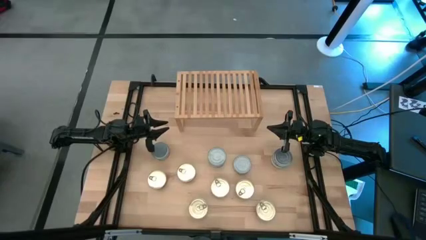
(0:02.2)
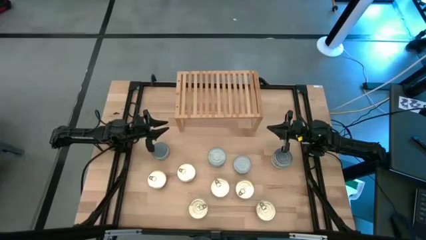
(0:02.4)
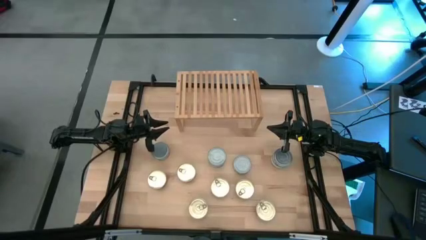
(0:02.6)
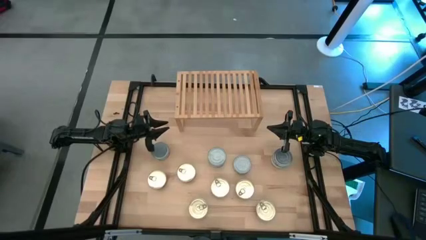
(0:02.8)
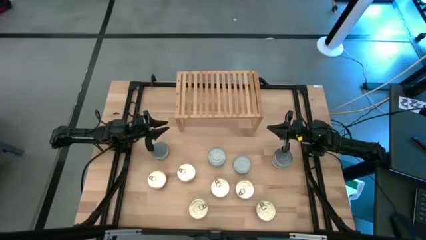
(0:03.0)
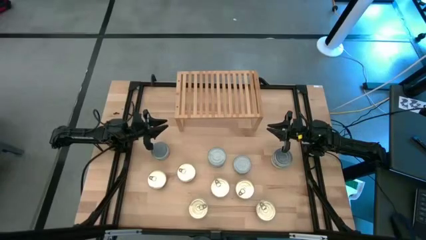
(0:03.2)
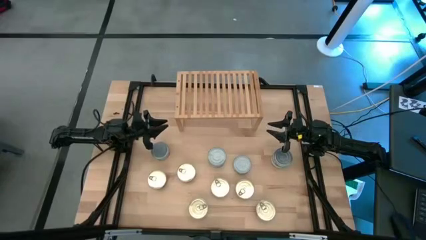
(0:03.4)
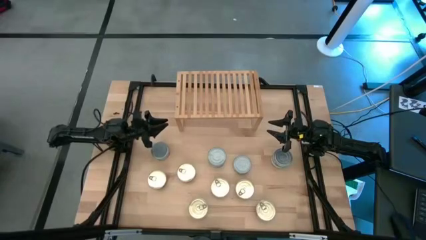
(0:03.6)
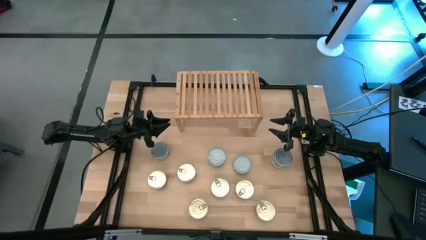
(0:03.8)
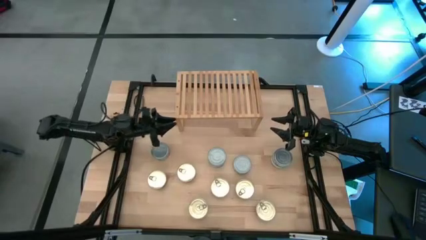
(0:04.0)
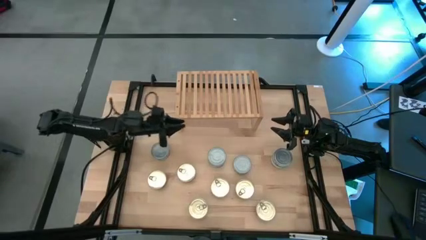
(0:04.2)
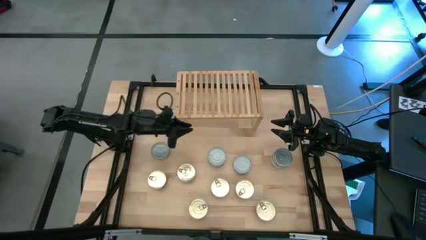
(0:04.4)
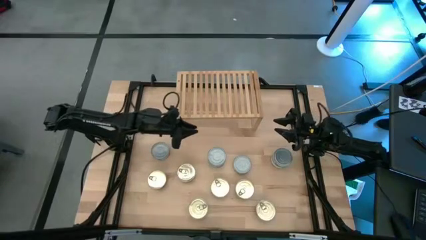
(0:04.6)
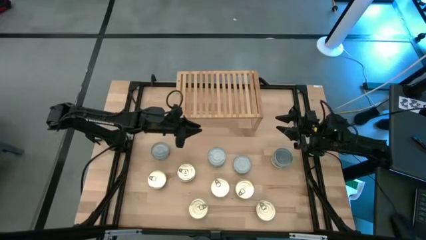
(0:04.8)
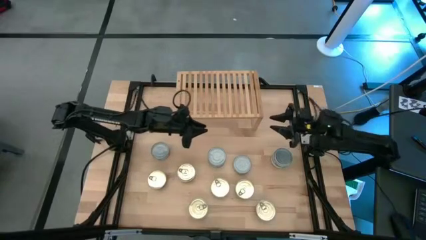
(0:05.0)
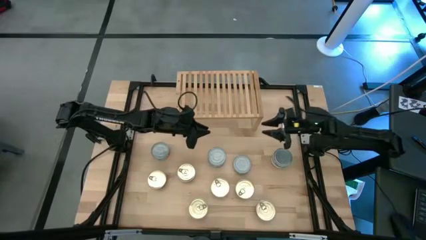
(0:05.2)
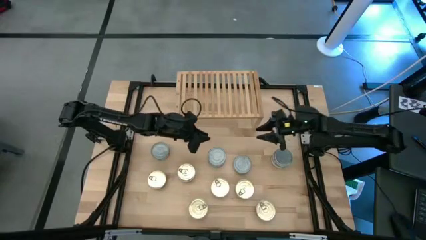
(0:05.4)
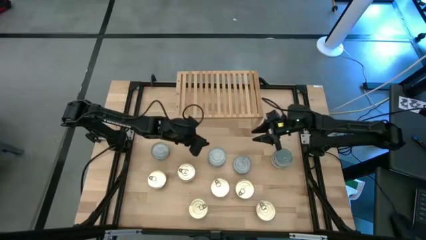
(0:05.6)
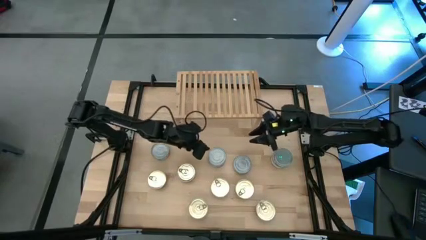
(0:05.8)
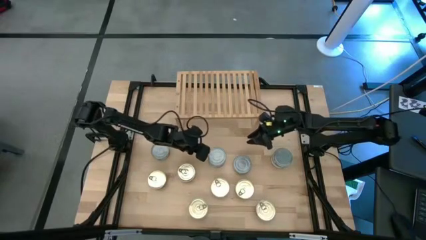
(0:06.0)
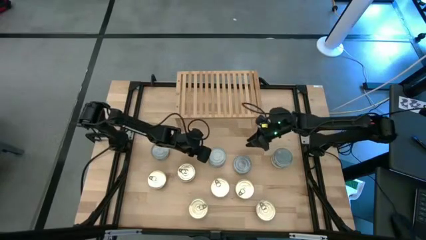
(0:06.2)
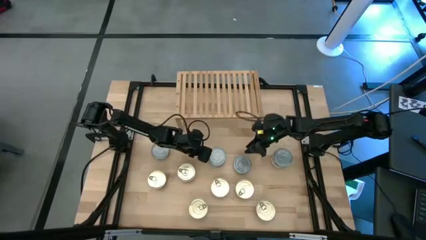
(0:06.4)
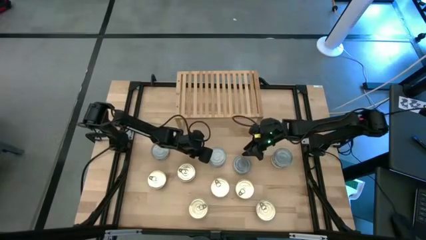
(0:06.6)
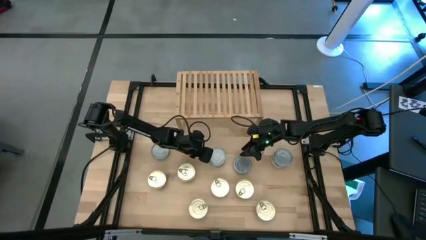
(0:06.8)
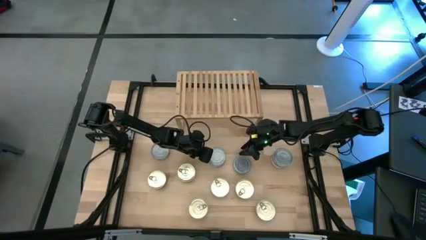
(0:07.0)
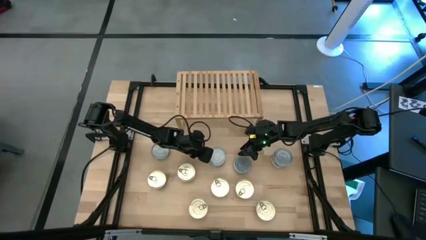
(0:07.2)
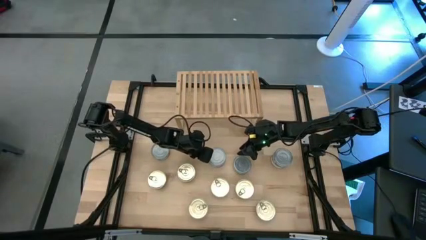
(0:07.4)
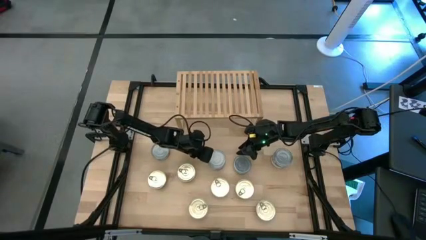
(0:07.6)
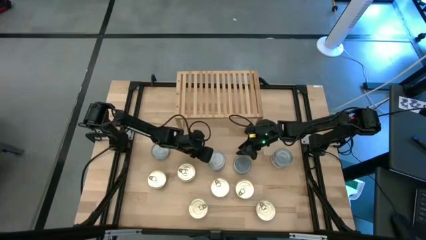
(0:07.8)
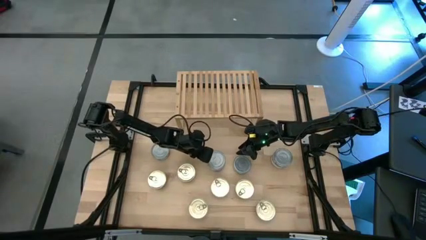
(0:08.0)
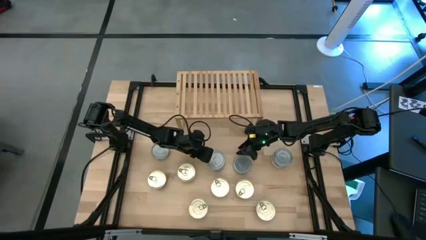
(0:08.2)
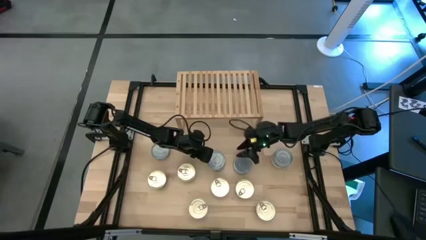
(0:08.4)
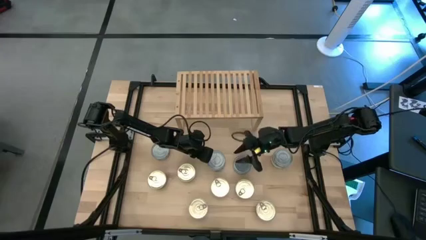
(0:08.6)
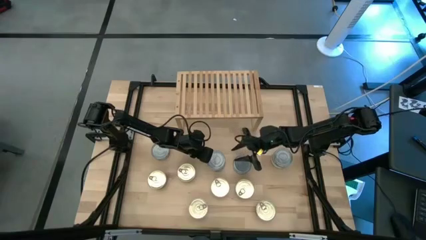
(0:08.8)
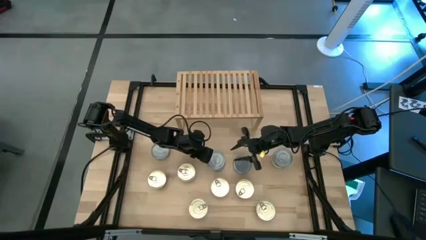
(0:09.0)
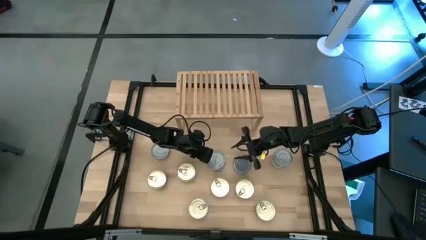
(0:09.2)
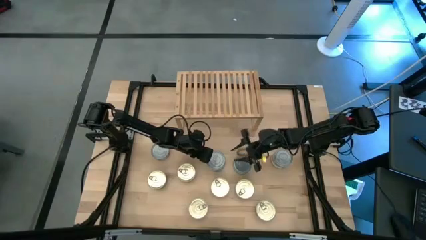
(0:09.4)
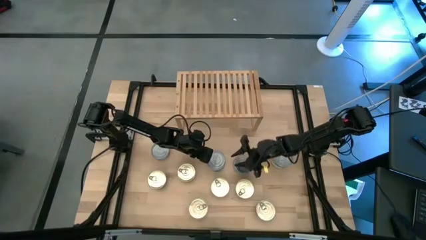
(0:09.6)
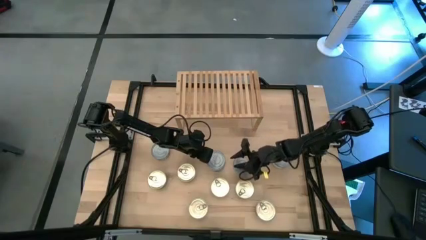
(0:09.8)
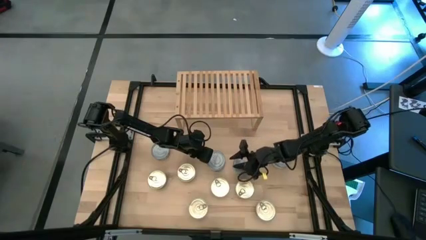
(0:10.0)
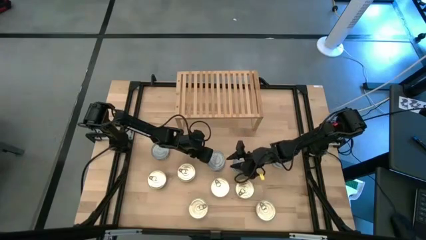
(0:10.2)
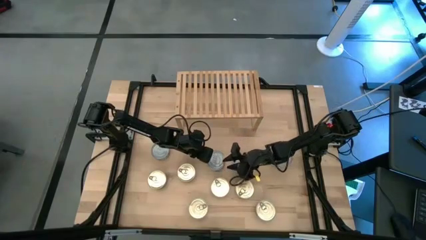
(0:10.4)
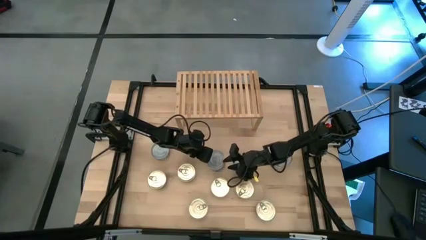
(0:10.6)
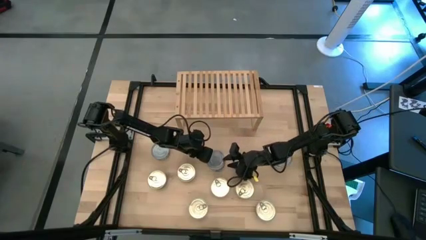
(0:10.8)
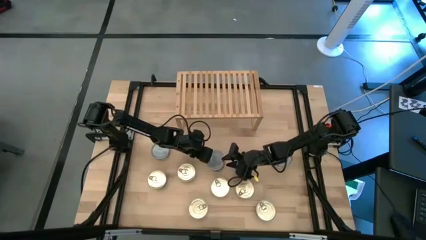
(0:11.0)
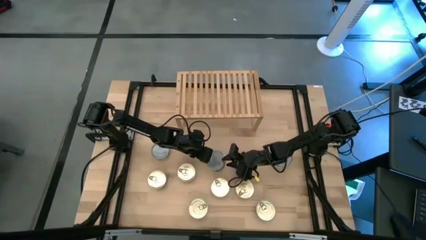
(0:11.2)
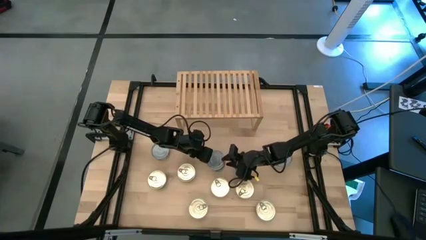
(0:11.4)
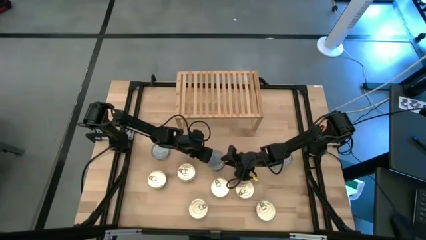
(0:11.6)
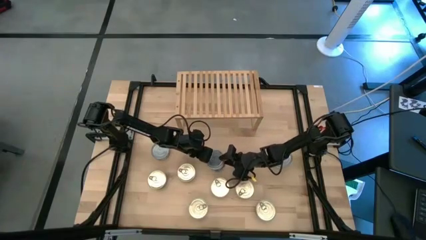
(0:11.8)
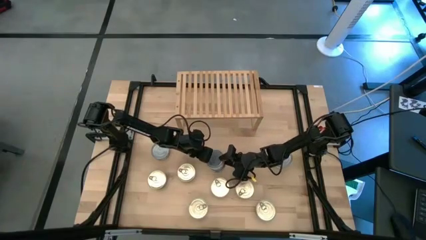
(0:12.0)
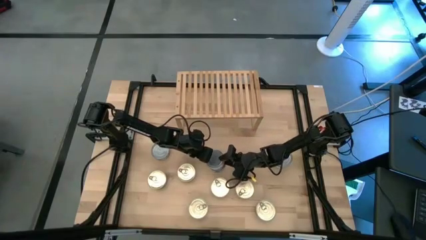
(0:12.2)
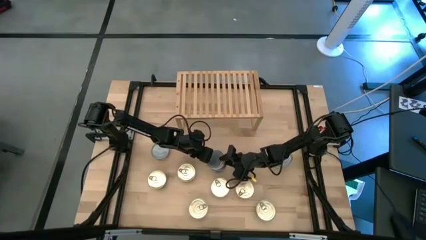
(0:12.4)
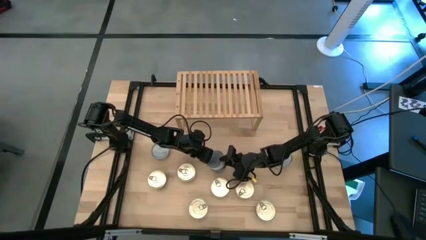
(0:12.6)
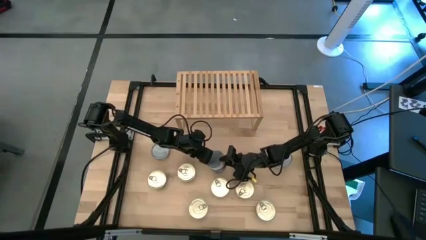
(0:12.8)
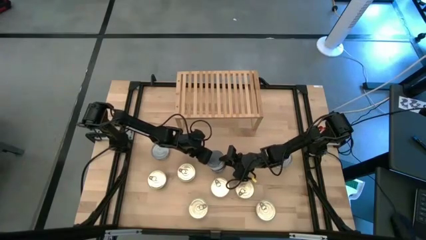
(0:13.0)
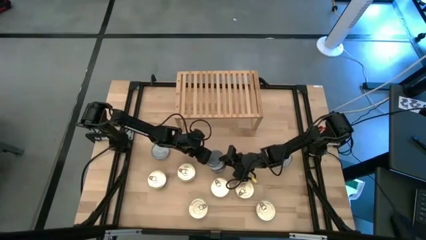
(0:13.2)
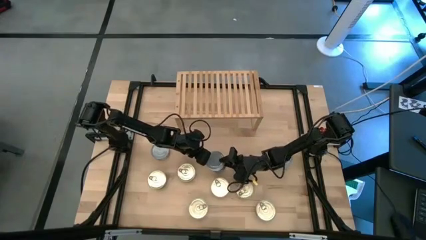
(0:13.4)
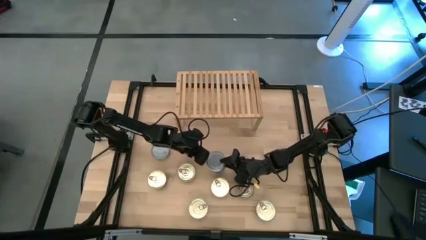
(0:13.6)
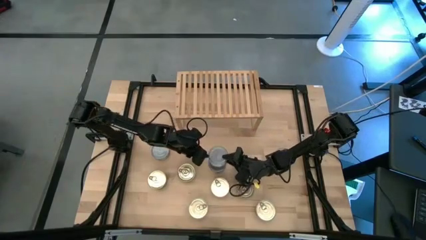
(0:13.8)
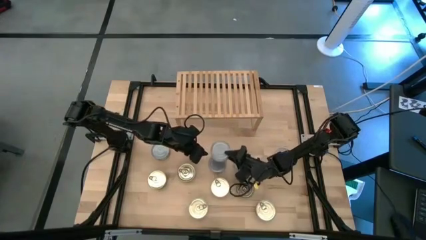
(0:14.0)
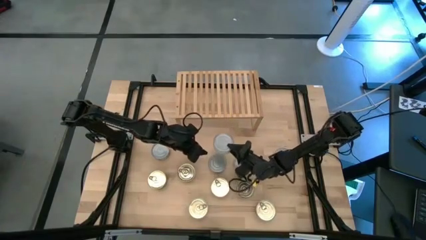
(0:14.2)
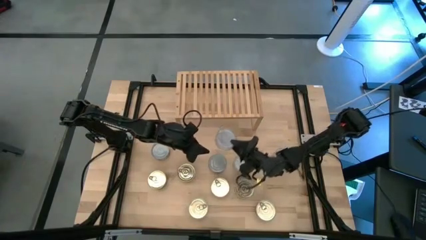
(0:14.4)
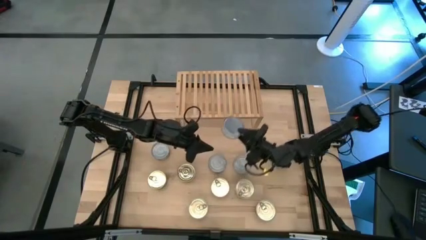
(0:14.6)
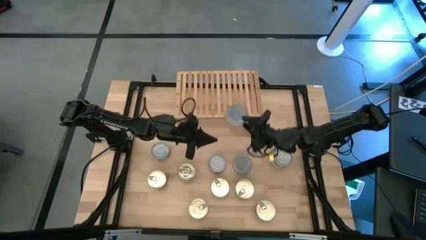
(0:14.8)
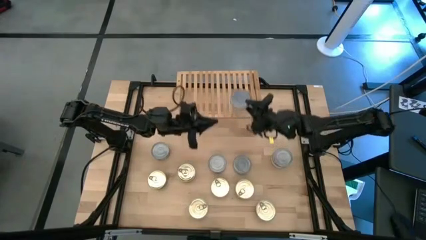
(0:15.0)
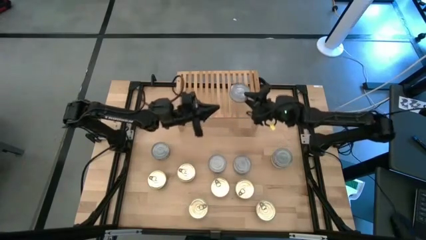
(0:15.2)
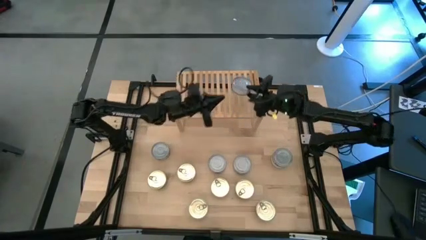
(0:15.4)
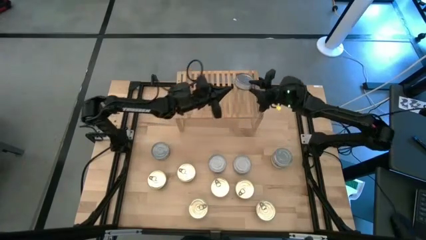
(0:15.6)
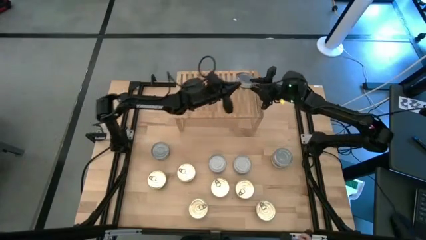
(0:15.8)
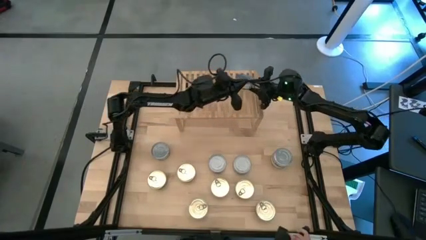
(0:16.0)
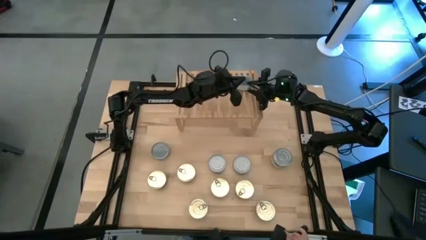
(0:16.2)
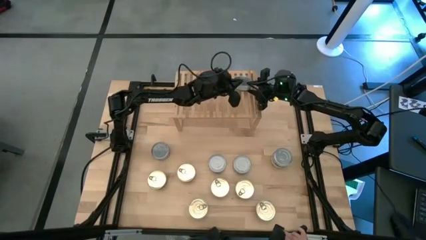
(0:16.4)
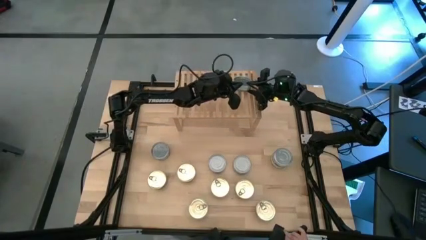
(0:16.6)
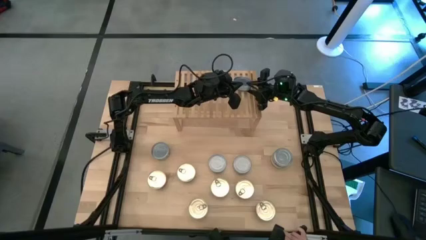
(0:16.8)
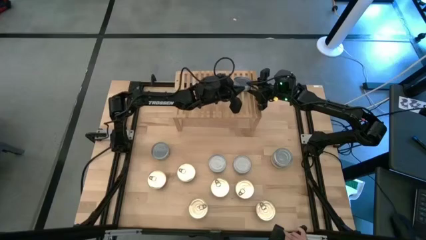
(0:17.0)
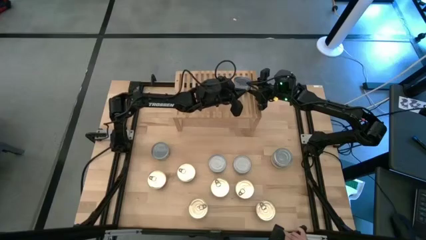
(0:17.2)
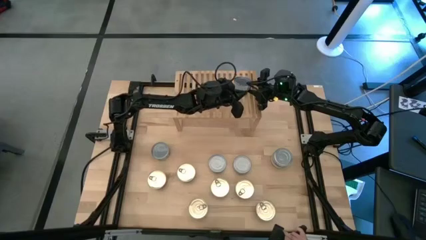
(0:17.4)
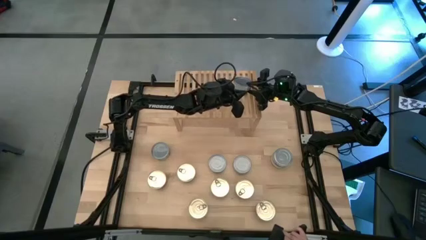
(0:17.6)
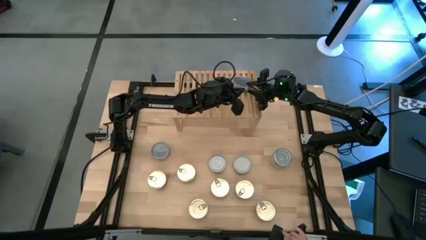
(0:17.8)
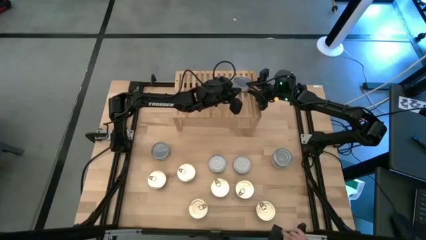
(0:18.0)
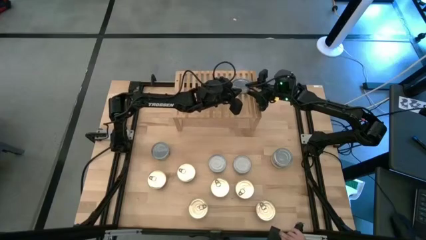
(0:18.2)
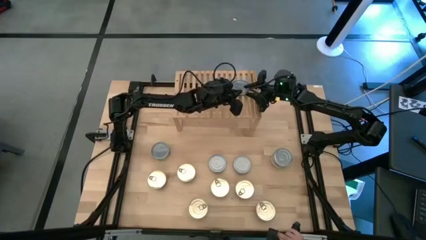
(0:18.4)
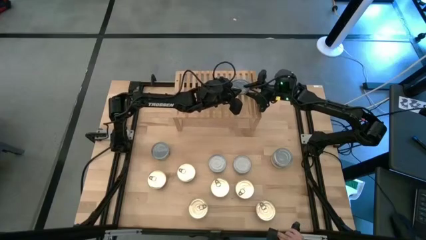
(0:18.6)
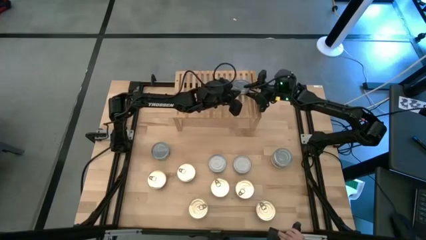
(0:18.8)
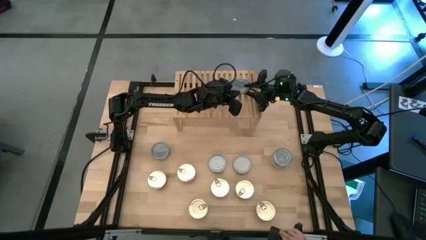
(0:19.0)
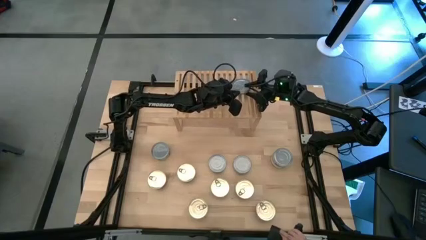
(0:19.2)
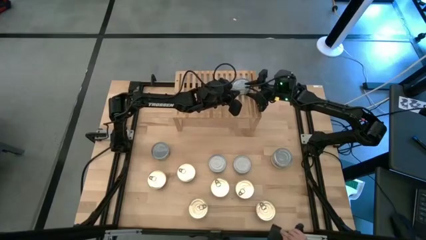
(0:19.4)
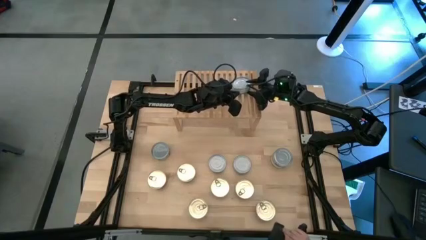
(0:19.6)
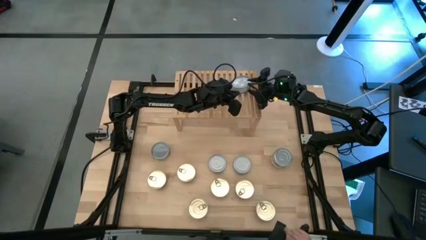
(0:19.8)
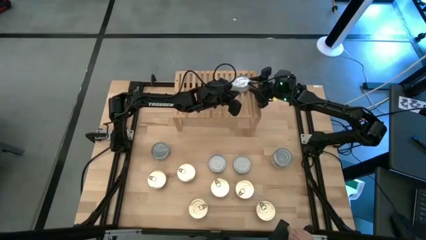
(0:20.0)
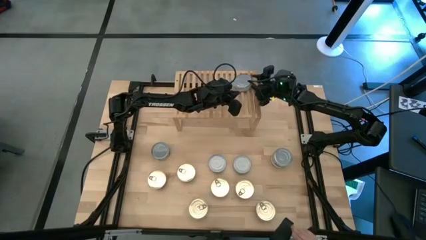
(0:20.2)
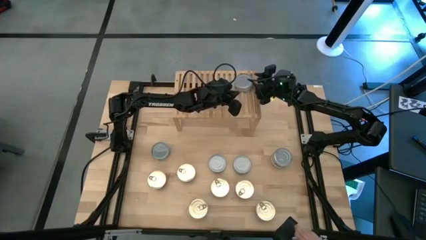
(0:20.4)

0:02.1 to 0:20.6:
Task: Stack canned seafood by type on shelf
Put the green tuna can on the shelf
